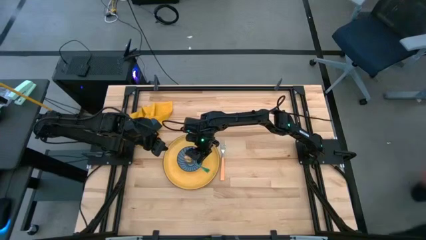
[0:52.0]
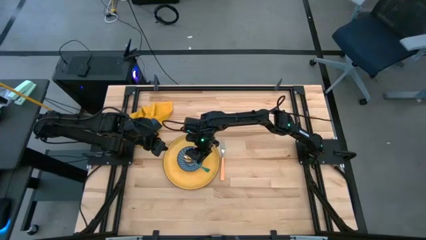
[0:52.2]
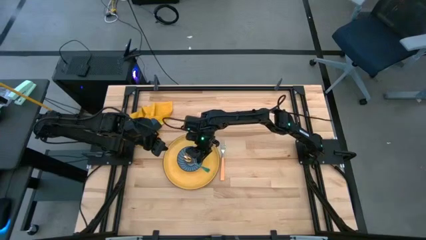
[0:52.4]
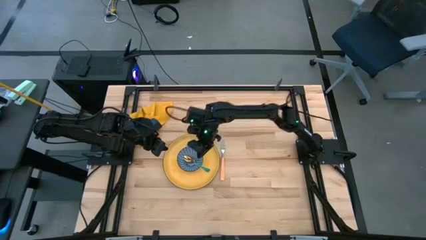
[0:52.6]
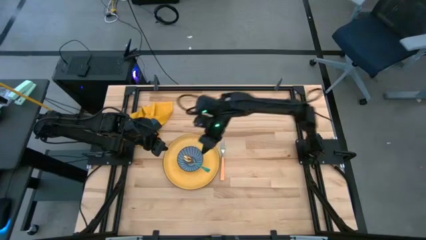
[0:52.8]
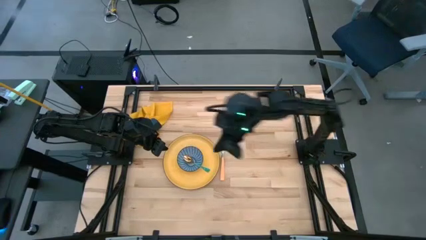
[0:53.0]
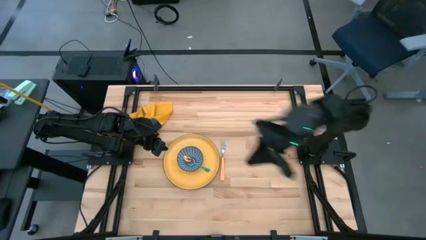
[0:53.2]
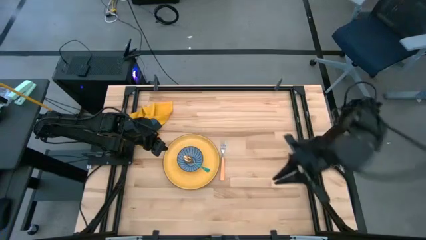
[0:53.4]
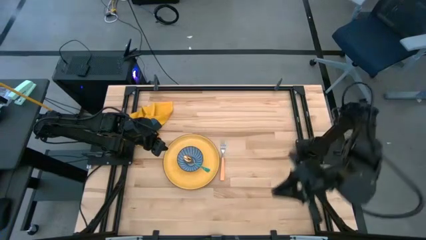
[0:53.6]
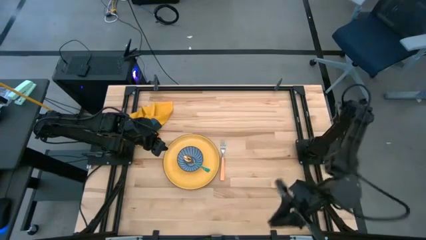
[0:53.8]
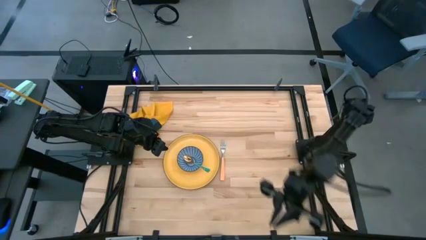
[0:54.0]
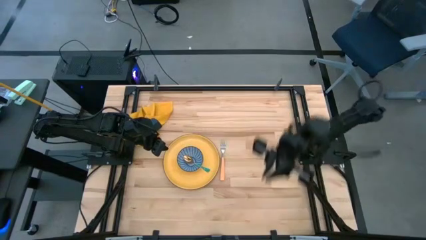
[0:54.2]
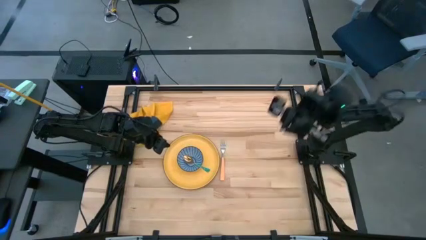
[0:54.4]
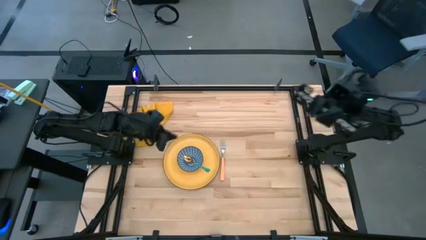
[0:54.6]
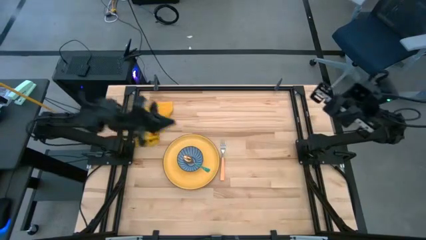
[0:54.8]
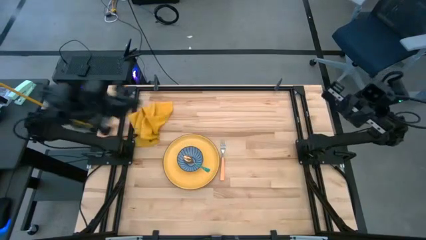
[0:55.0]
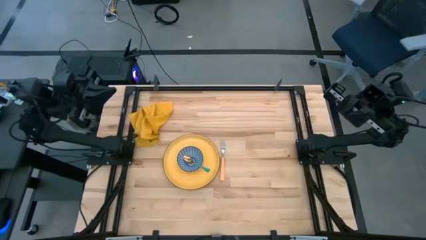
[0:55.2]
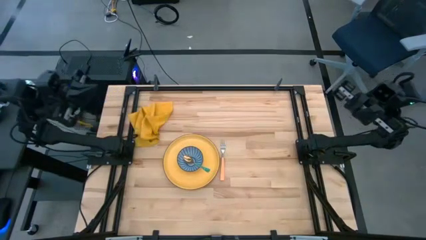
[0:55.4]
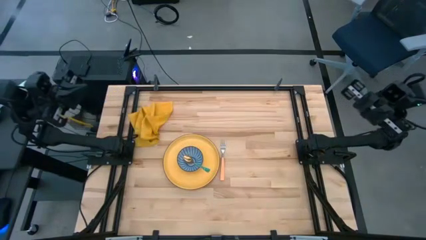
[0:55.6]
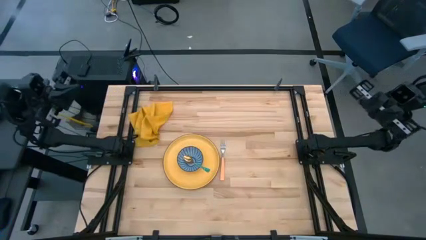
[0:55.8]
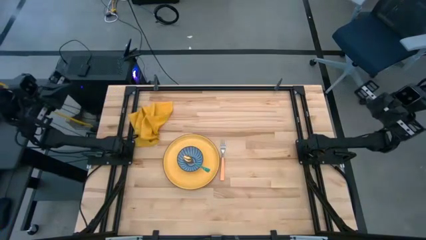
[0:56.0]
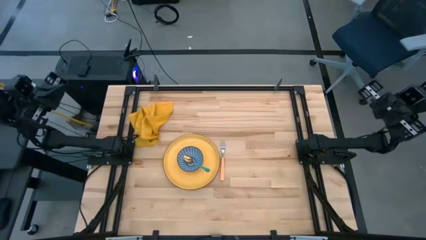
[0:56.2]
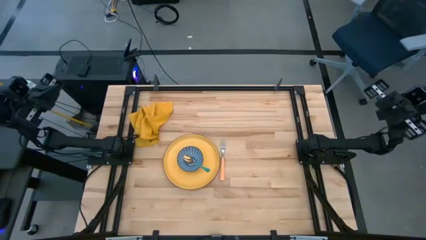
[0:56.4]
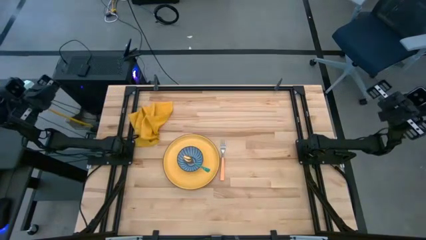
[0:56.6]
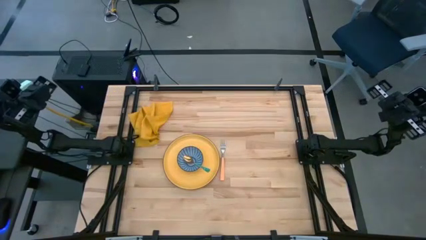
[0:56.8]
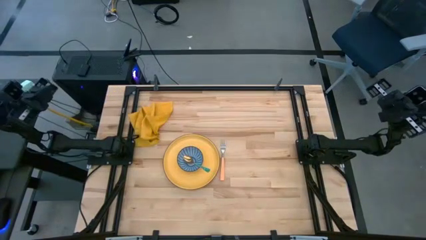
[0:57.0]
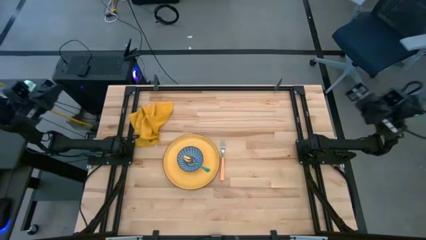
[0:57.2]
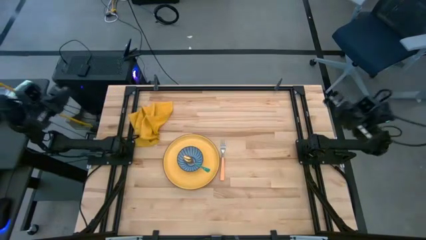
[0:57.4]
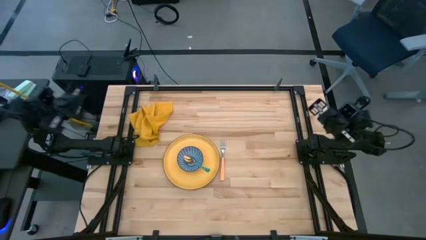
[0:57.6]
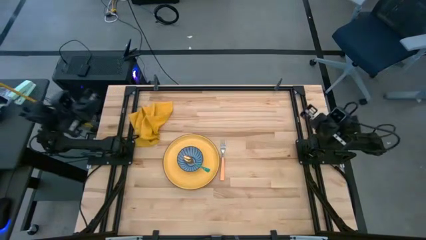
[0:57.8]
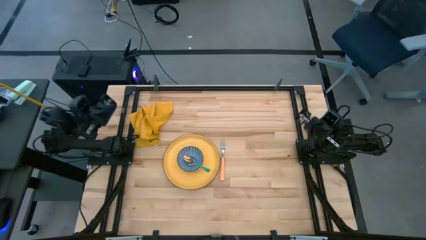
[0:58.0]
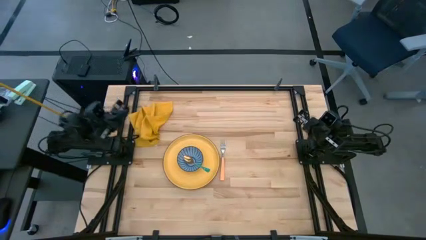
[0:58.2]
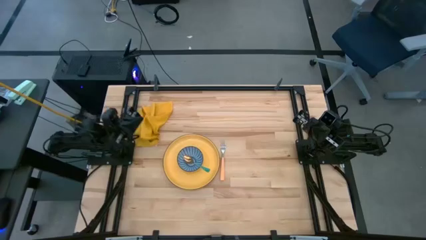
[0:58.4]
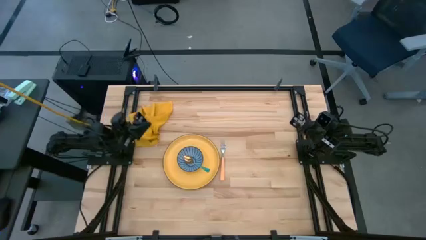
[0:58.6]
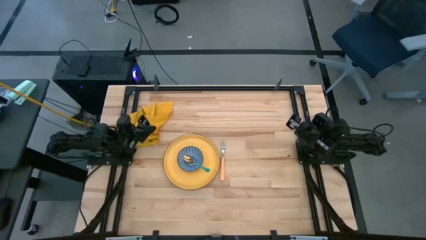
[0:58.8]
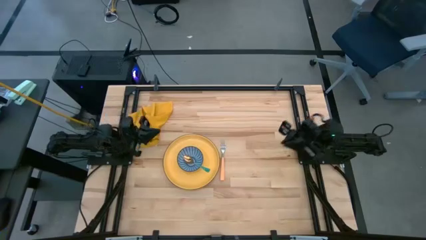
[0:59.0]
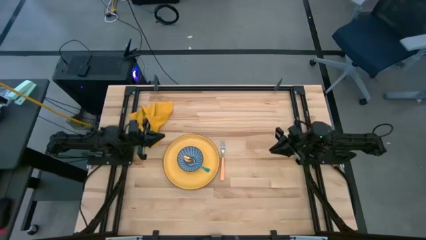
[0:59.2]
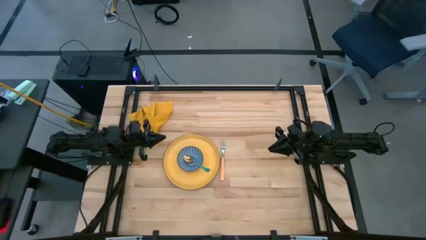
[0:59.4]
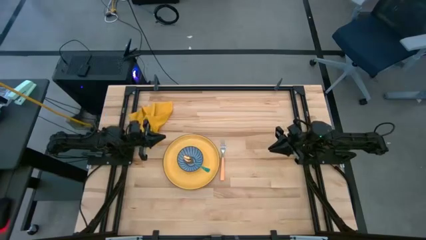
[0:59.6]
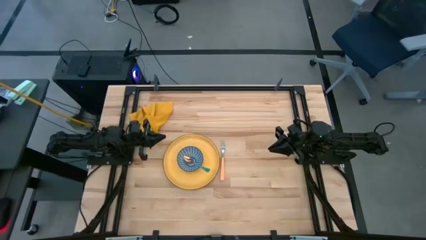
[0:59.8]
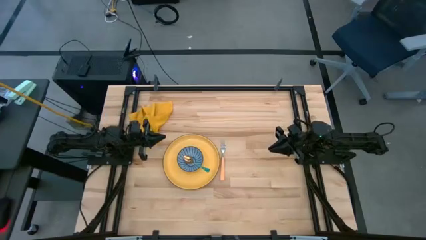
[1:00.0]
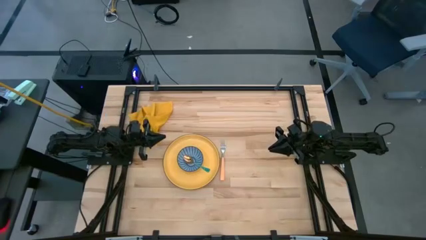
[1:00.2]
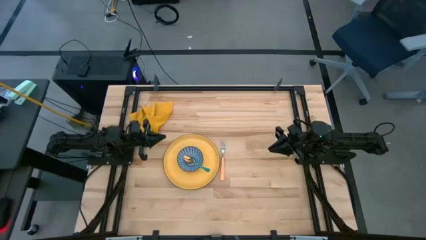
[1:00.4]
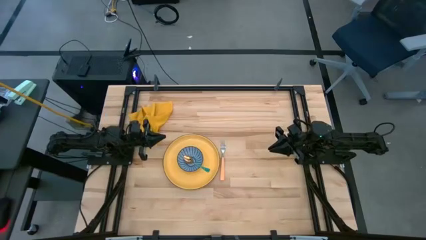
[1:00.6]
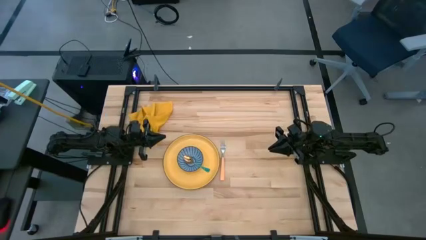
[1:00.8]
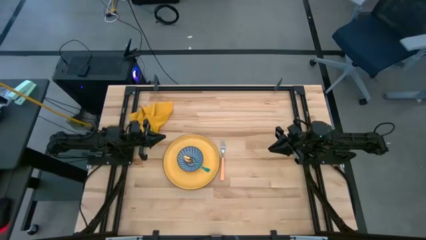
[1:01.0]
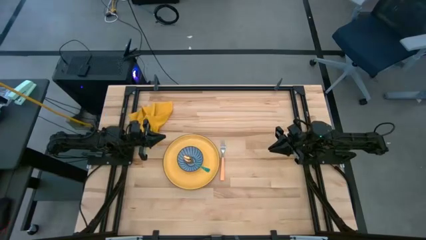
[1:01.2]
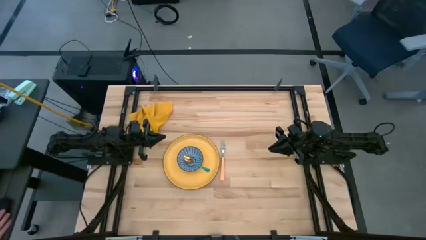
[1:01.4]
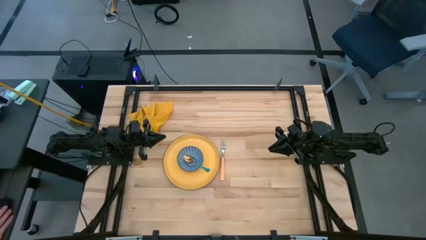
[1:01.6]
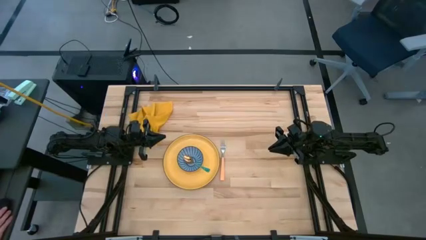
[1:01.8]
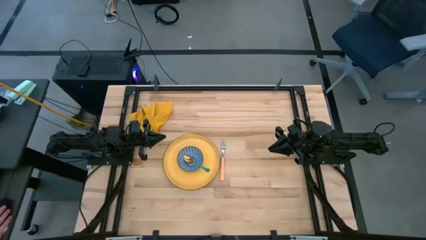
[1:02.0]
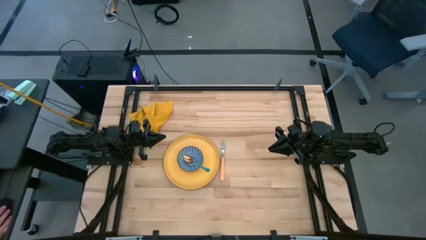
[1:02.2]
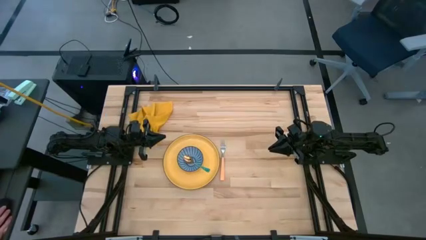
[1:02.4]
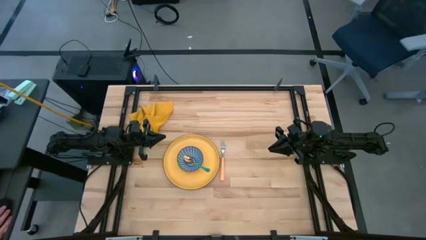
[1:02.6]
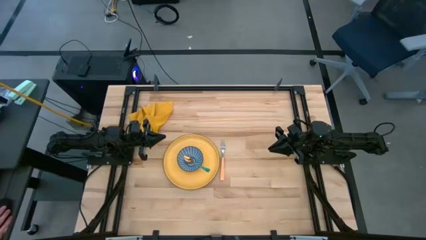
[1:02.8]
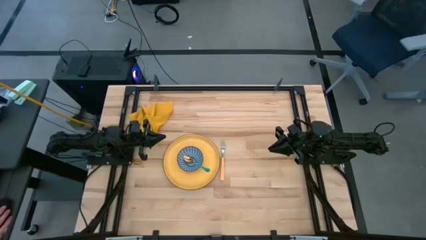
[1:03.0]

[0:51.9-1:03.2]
Task: Set table place
Return to Home Position
